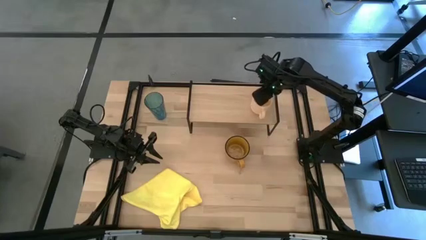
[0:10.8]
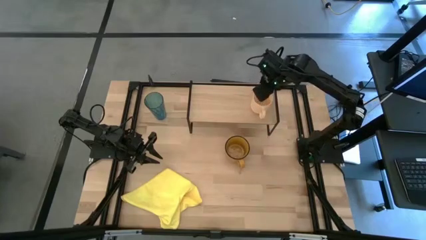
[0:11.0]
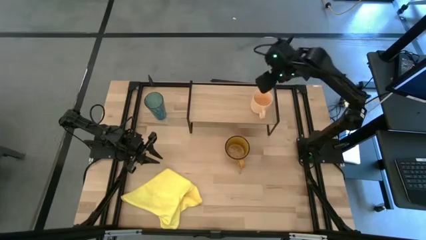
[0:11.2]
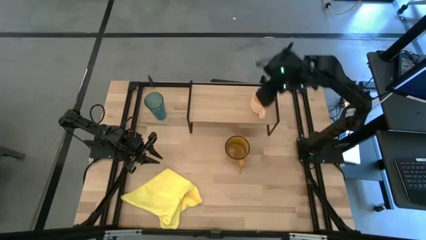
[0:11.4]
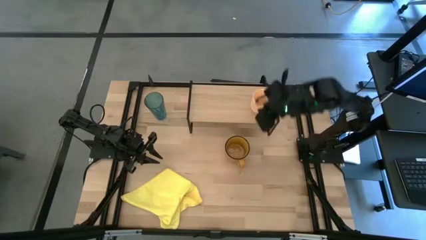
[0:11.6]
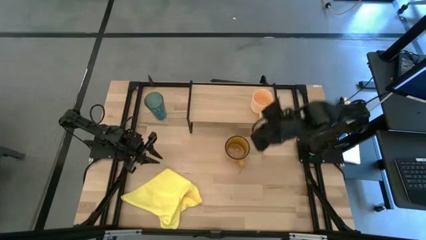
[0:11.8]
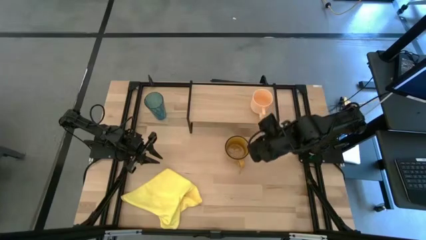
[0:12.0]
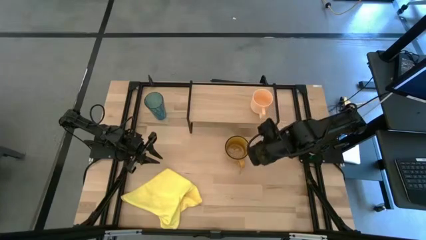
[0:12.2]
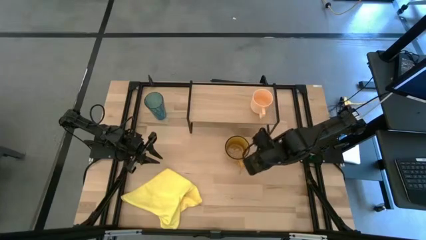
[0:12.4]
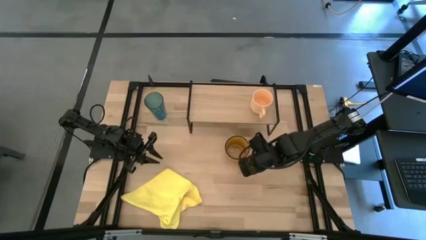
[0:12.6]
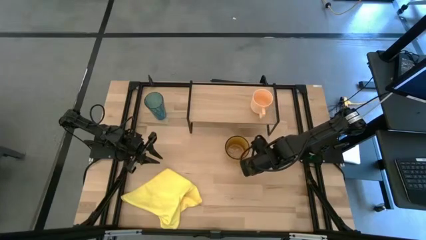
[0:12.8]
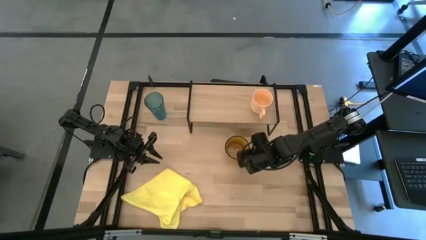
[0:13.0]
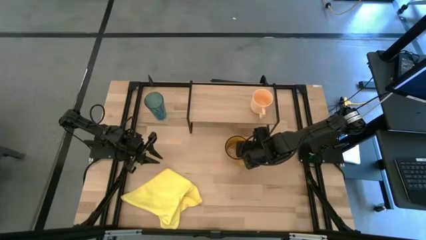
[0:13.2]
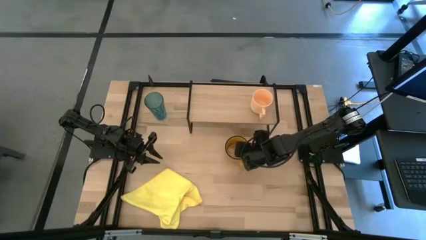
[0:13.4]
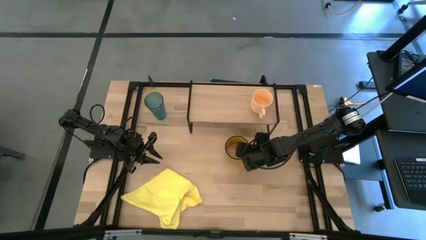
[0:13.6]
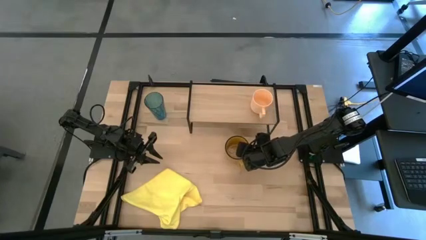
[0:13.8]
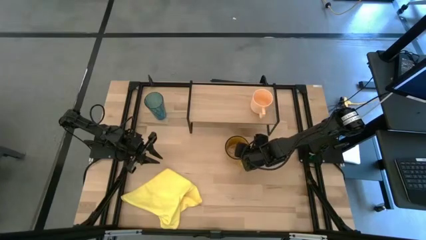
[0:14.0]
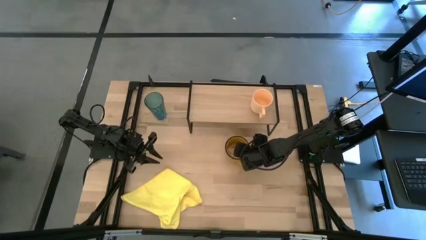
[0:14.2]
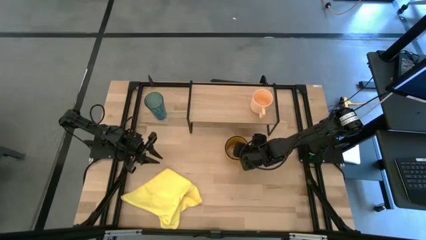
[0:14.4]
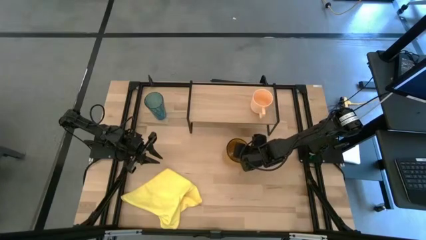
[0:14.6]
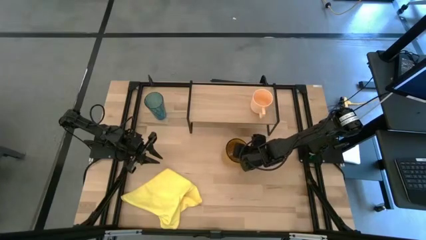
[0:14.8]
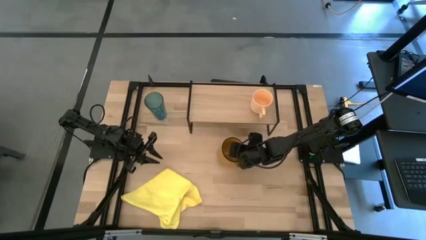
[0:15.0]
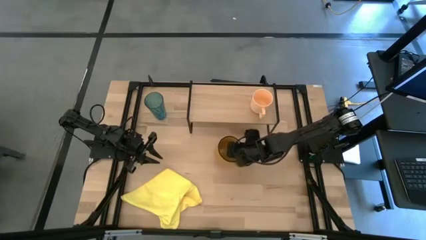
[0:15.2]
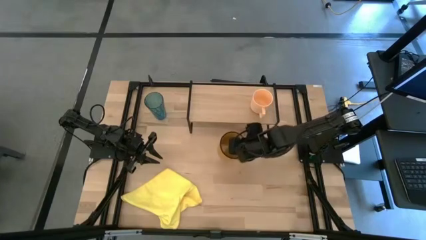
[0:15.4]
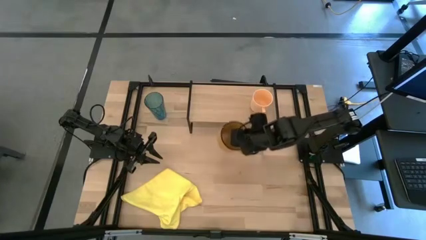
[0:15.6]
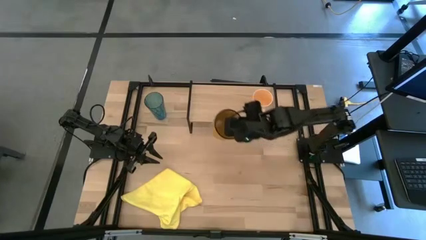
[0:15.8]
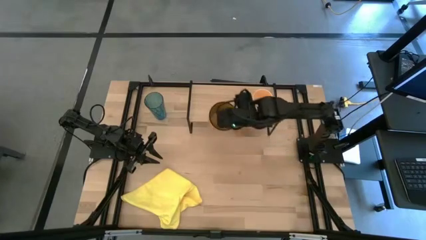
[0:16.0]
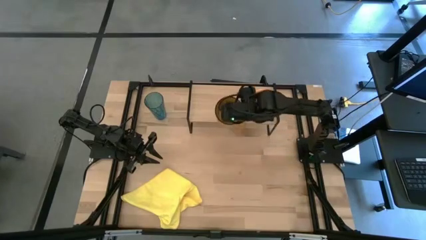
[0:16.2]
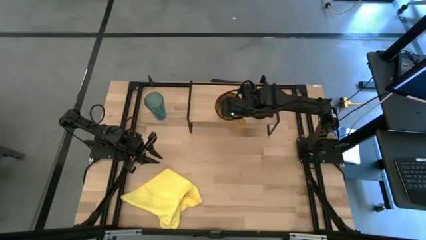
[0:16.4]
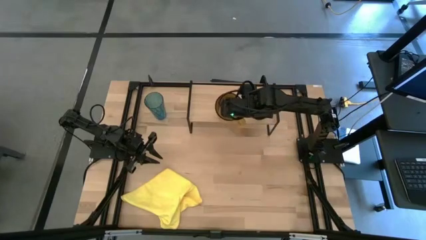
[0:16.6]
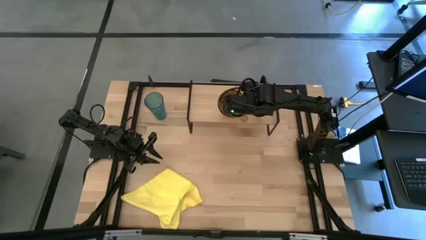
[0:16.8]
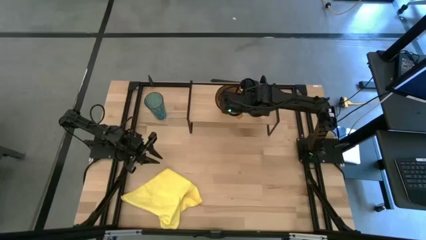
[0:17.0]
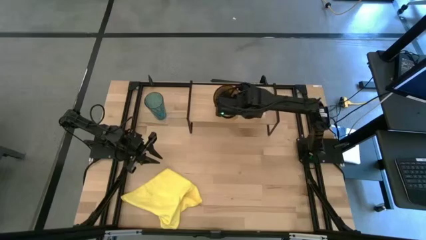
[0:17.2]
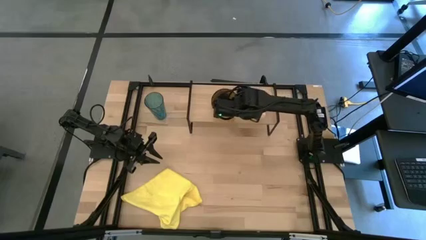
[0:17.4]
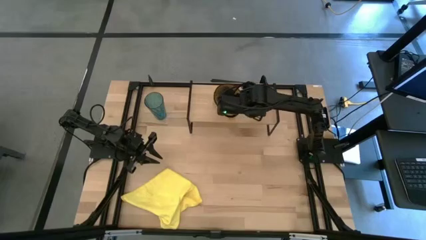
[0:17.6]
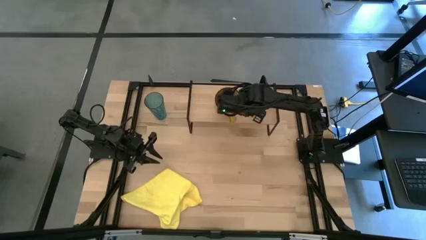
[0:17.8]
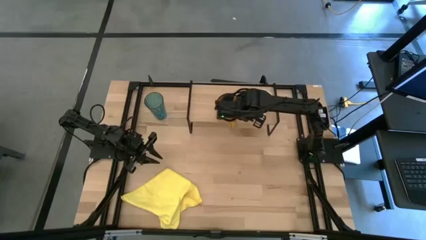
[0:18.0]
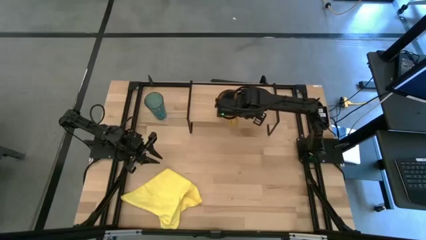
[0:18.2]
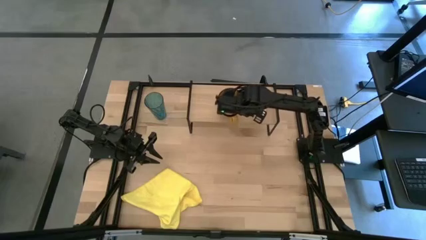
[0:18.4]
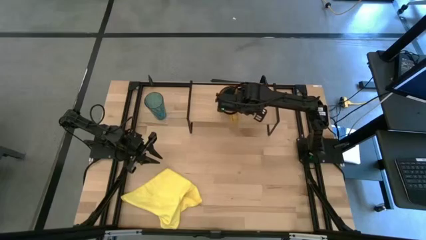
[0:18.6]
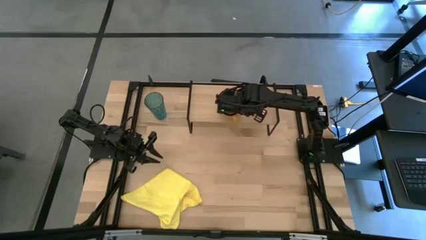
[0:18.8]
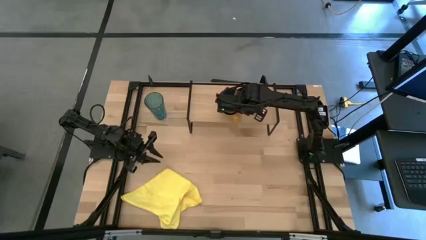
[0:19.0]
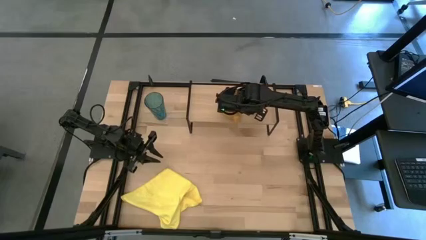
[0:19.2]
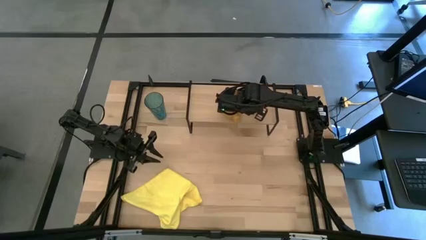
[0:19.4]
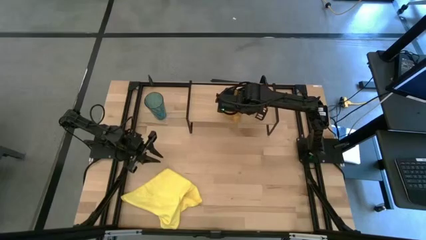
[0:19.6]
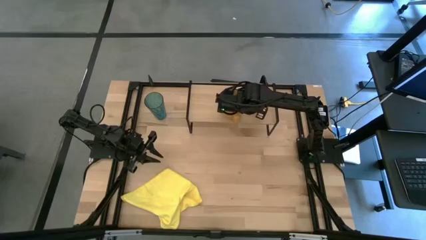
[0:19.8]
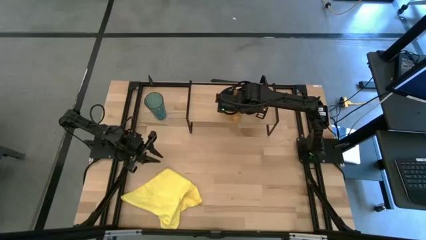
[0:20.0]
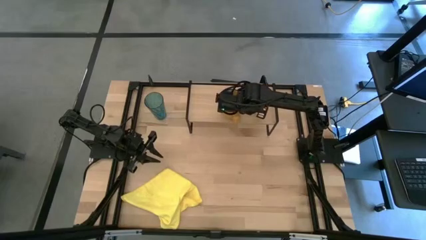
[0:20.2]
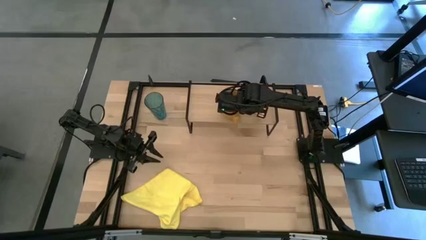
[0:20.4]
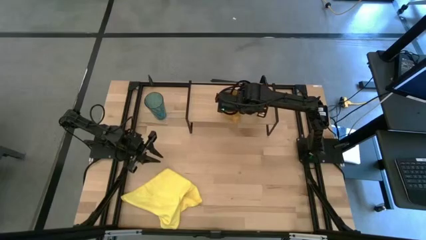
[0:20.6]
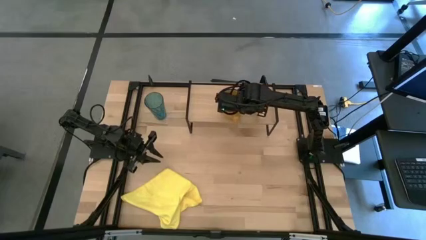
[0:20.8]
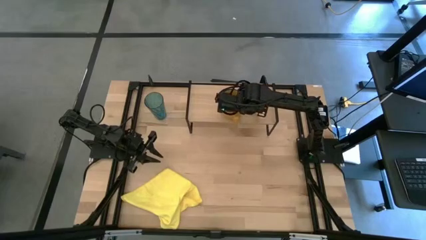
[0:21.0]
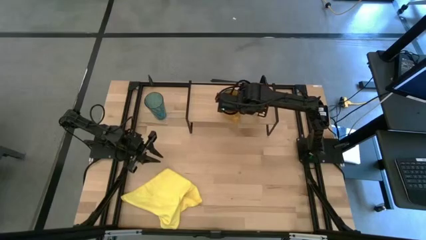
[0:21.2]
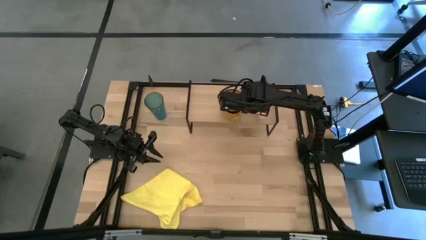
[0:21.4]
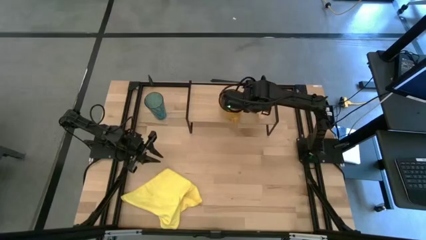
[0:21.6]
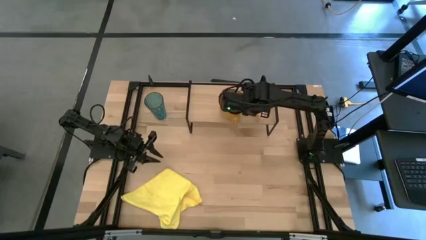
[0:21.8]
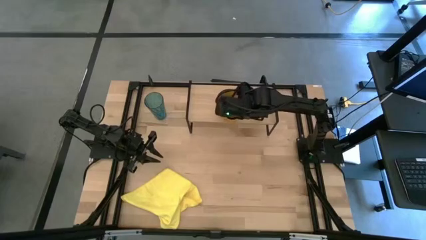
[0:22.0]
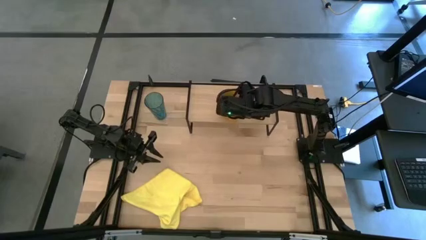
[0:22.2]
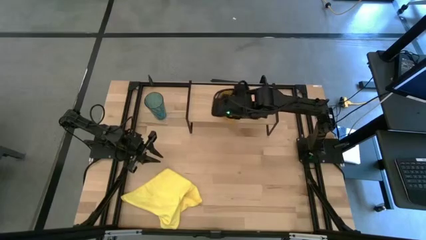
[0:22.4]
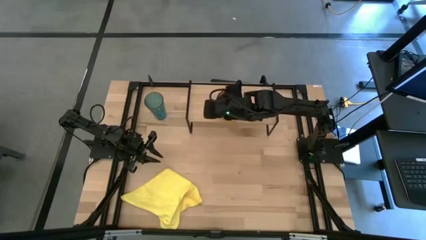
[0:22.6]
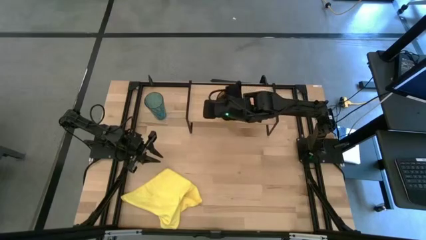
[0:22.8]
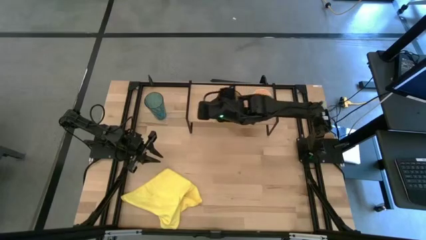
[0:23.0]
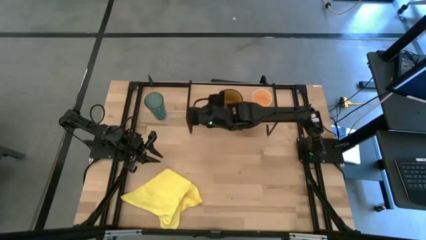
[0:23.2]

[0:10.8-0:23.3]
Task: Stack small to large cups/mugs on shelf
Put the orange mug on the shelf

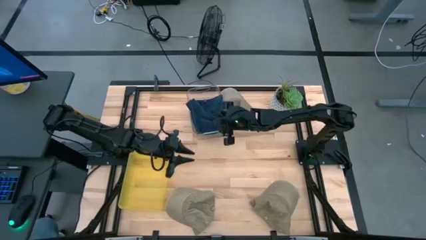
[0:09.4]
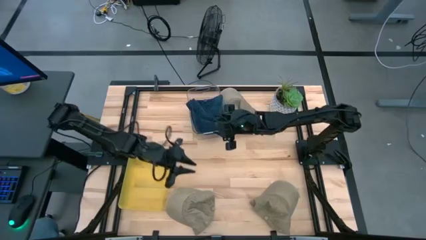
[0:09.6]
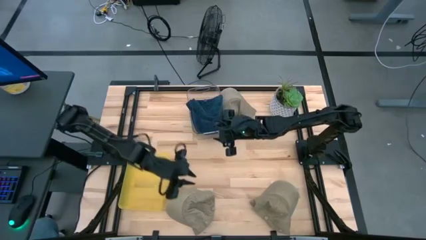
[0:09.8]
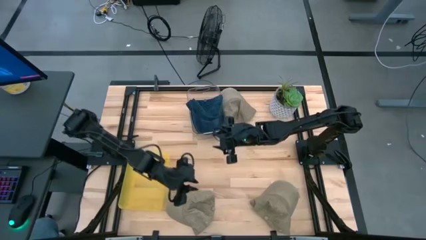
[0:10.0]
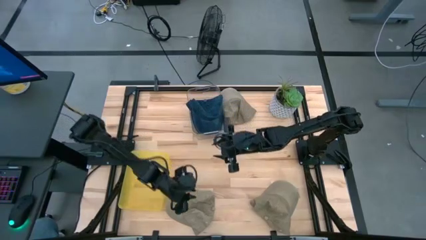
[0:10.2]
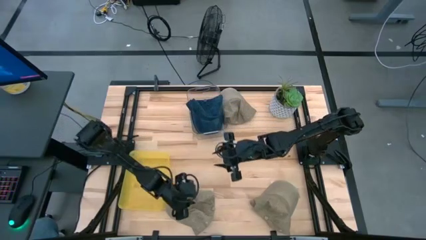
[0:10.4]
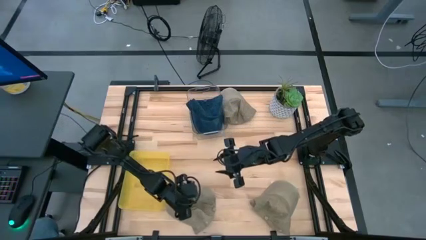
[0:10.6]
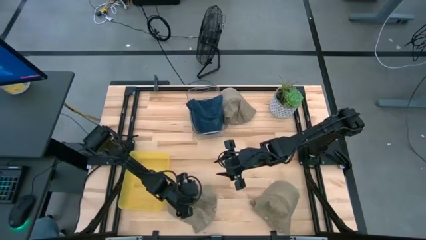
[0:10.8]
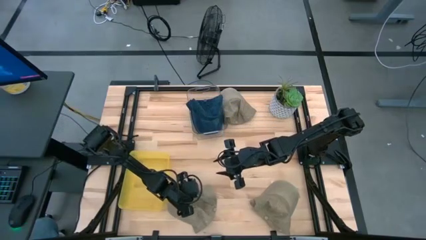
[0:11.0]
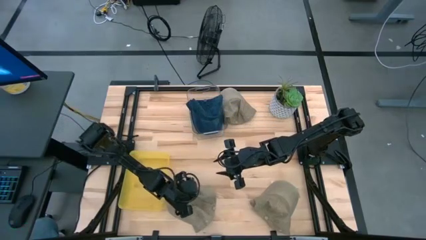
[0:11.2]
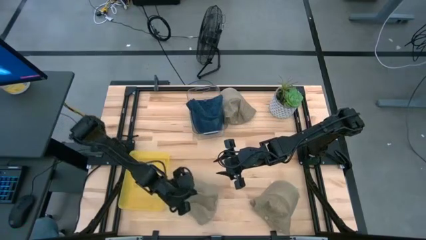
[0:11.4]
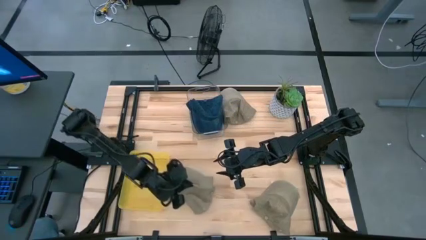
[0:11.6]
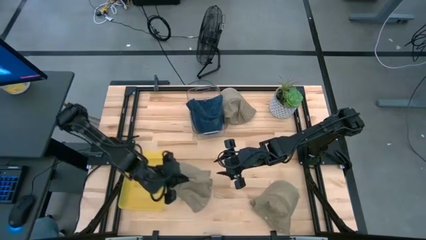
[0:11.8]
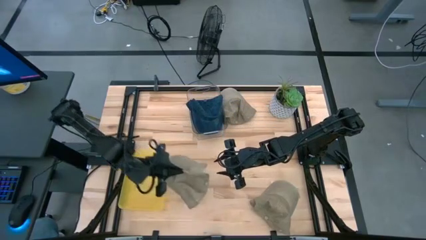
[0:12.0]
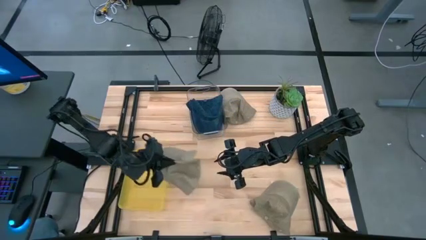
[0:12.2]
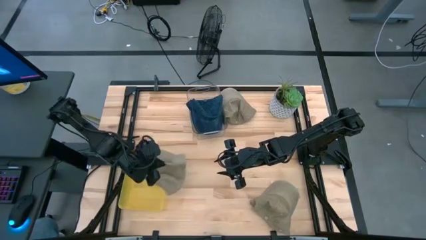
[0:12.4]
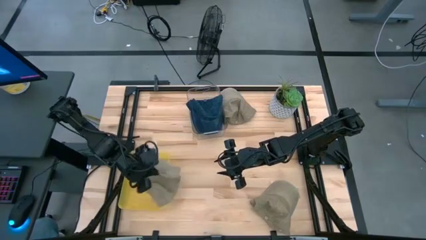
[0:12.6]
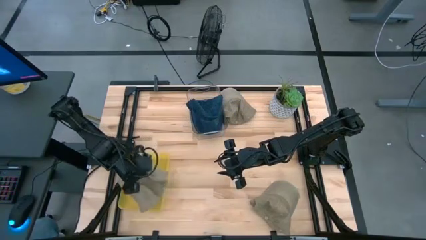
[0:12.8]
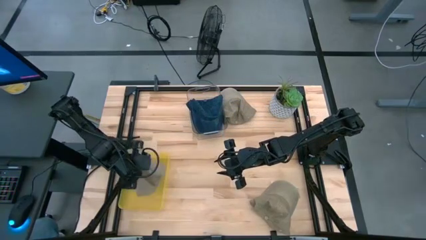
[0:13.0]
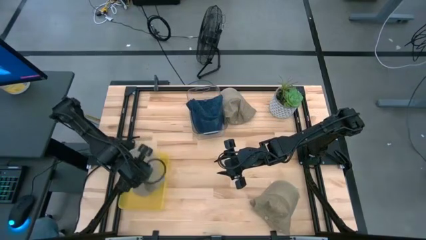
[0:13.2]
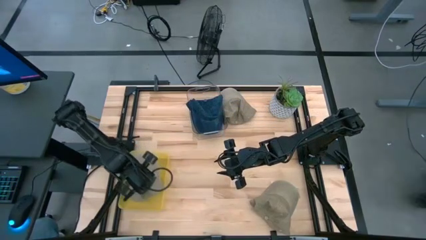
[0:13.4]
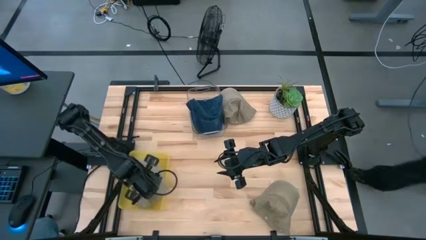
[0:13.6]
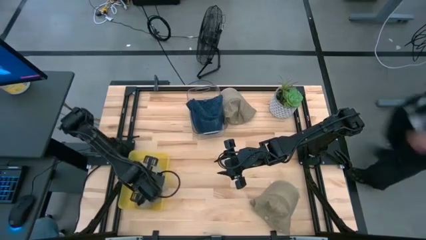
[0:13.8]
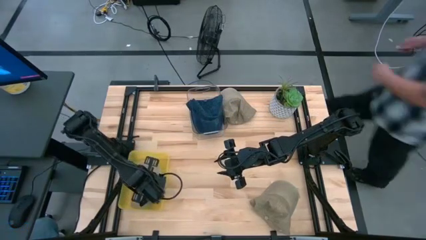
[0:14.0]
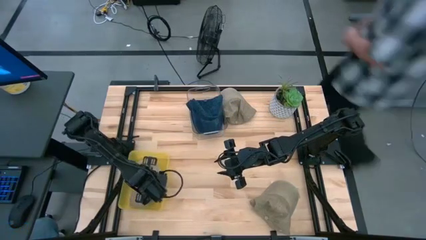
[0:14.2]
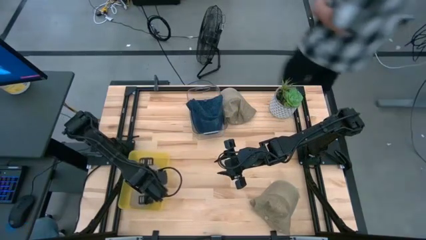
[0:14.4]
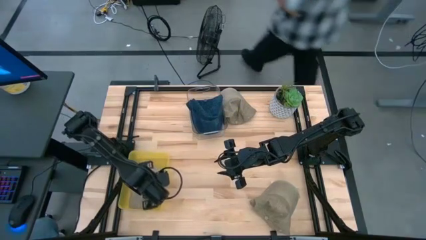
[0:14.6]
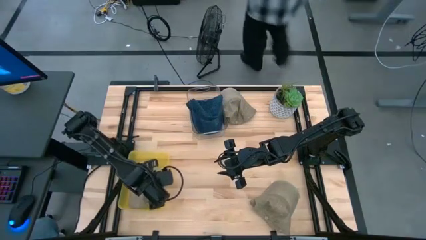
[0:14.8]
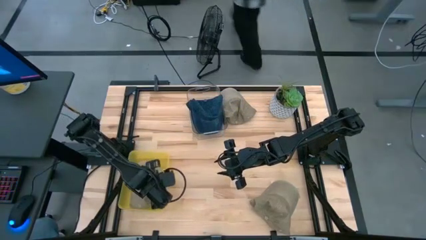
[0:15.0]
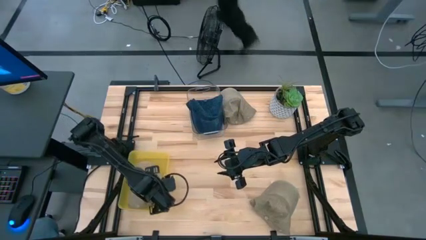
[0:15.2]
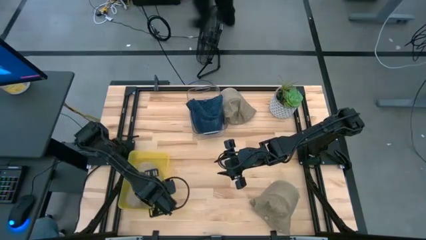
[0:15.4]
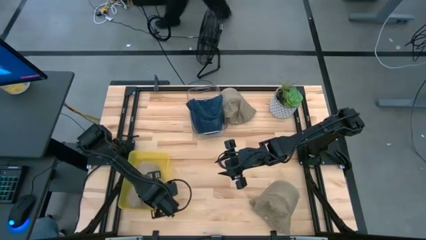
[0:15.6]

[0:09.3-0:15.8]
Task: Pick & Place hat
Put the bottom left brown cap into the yellow bin
